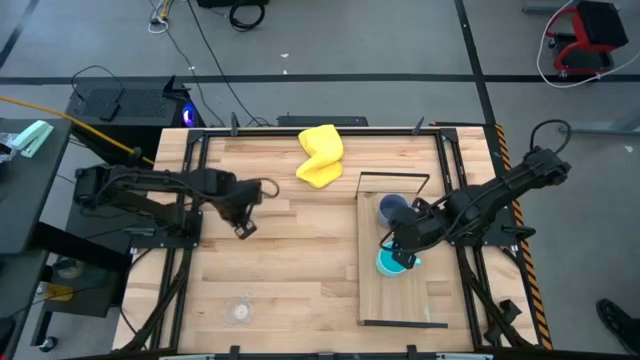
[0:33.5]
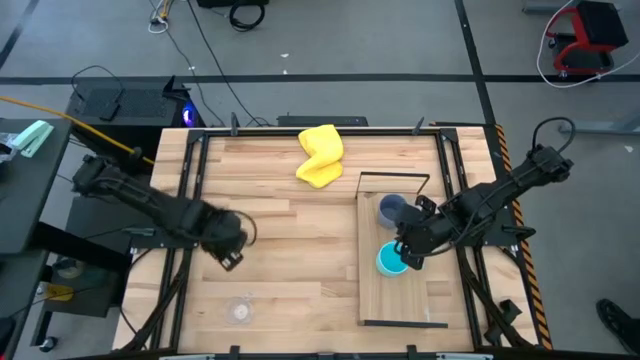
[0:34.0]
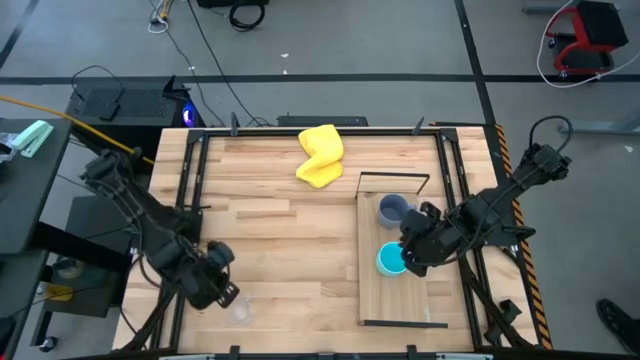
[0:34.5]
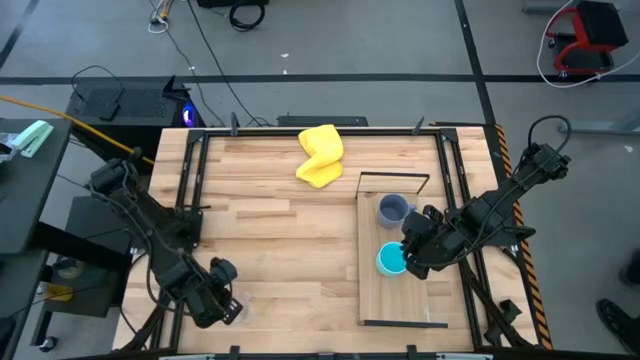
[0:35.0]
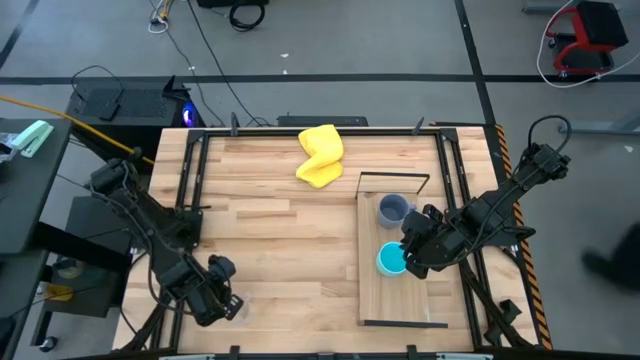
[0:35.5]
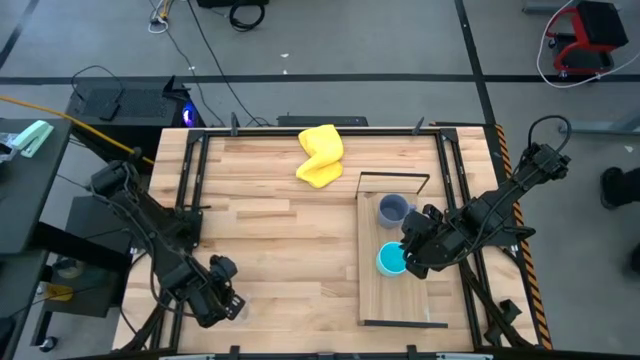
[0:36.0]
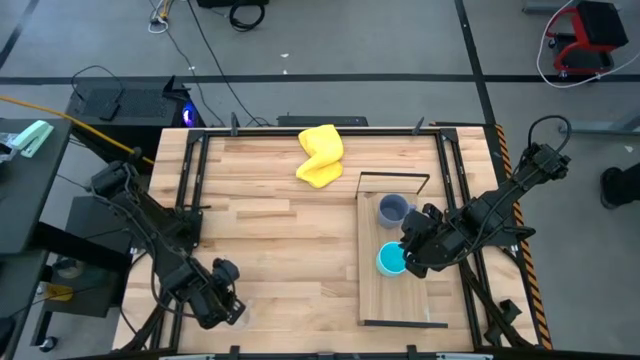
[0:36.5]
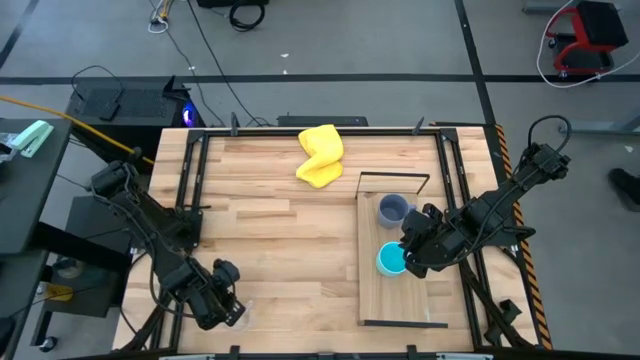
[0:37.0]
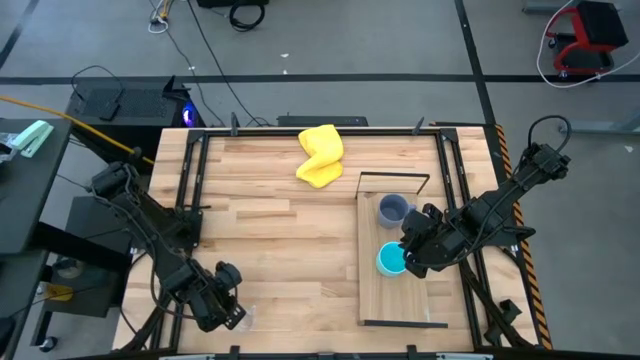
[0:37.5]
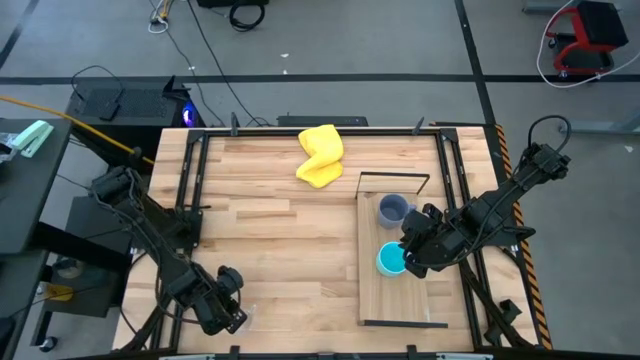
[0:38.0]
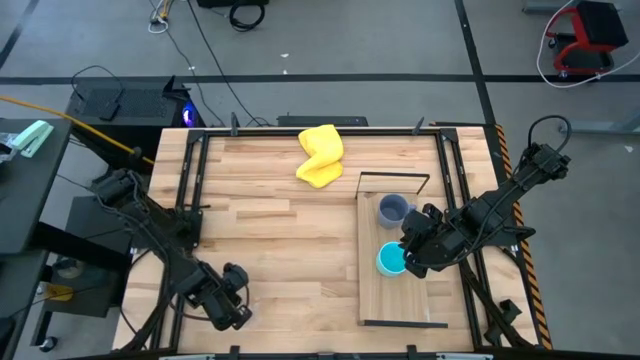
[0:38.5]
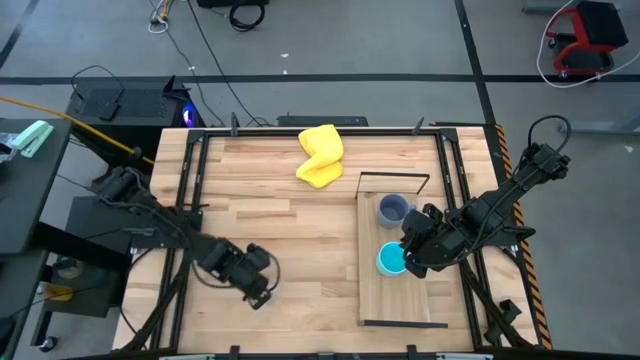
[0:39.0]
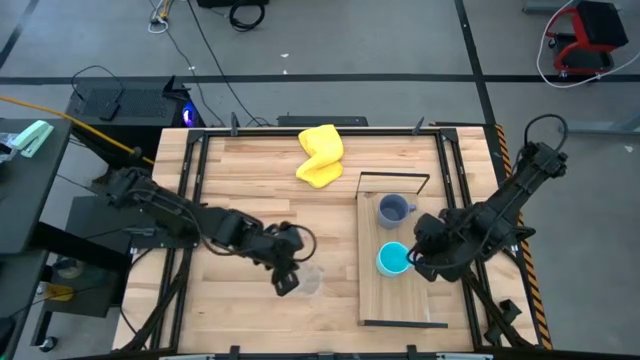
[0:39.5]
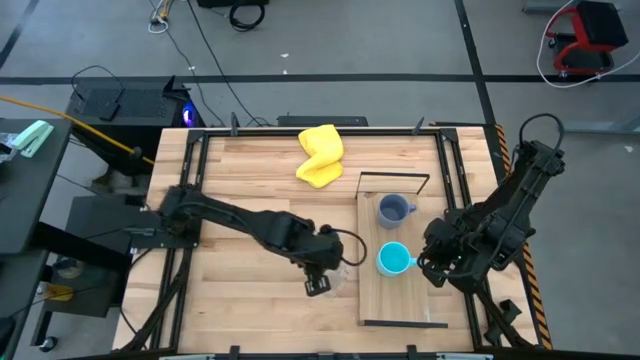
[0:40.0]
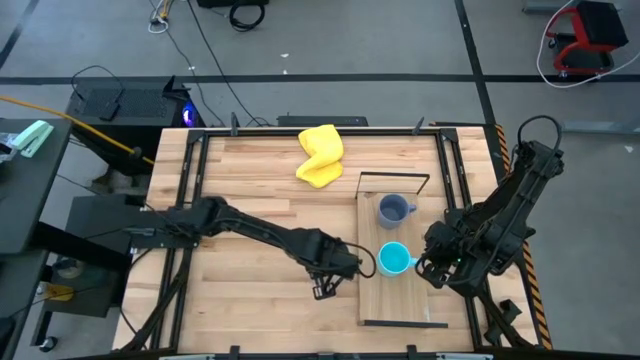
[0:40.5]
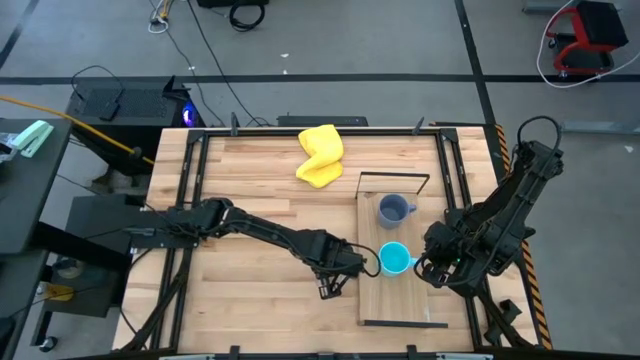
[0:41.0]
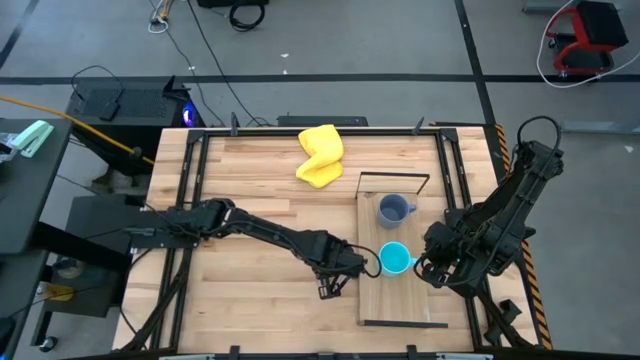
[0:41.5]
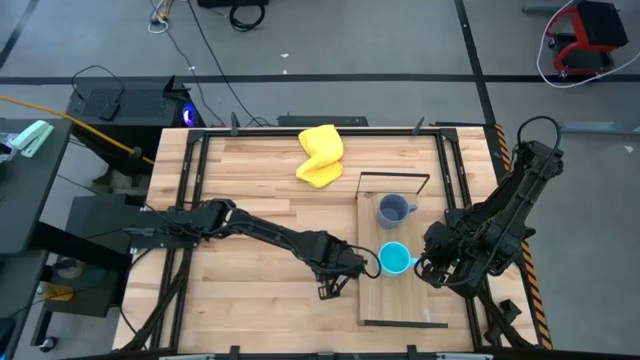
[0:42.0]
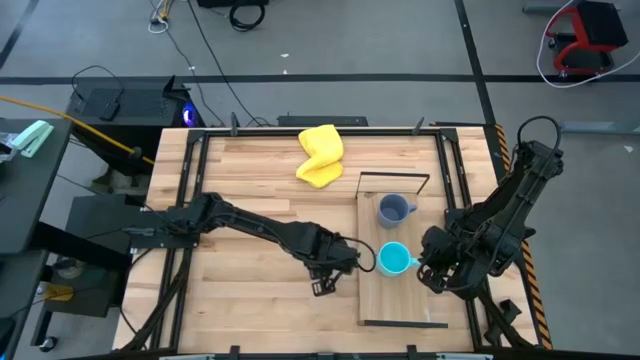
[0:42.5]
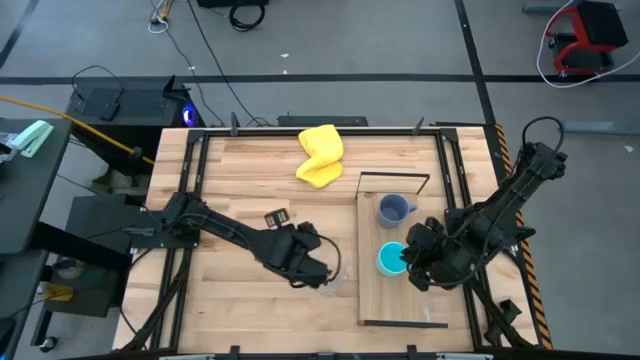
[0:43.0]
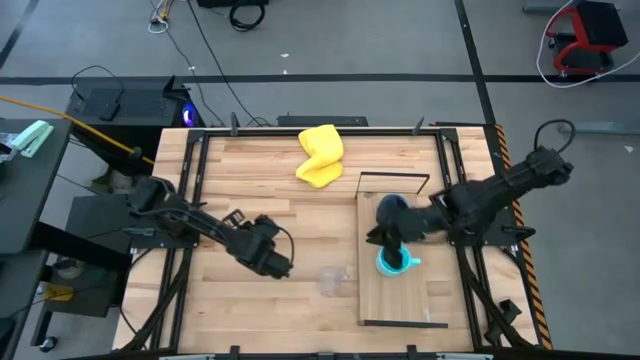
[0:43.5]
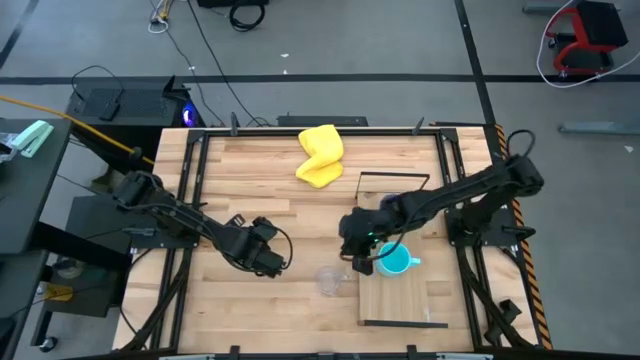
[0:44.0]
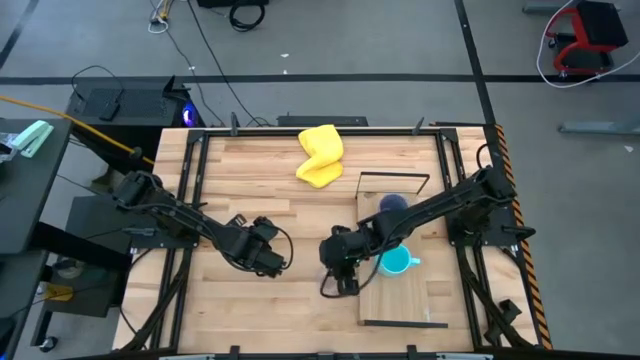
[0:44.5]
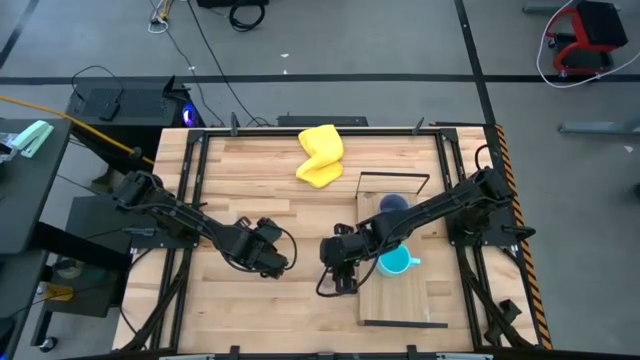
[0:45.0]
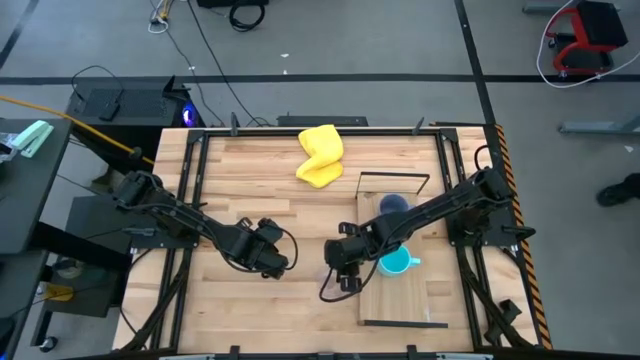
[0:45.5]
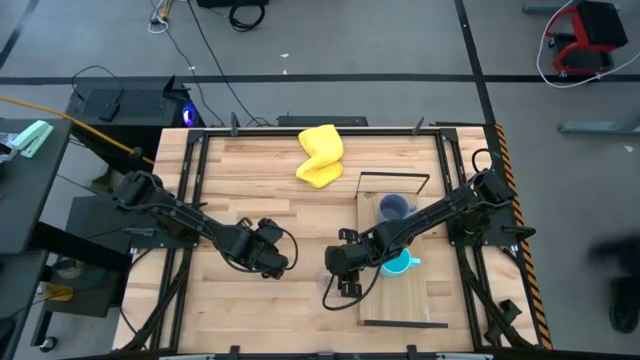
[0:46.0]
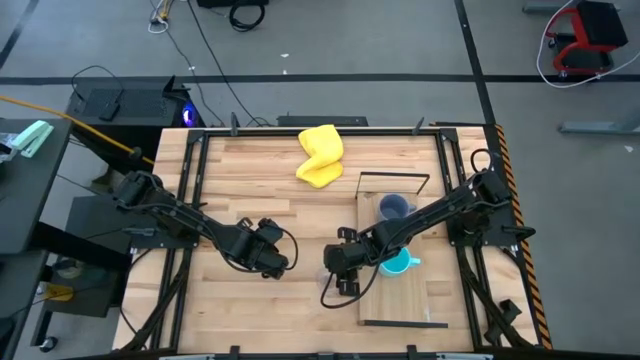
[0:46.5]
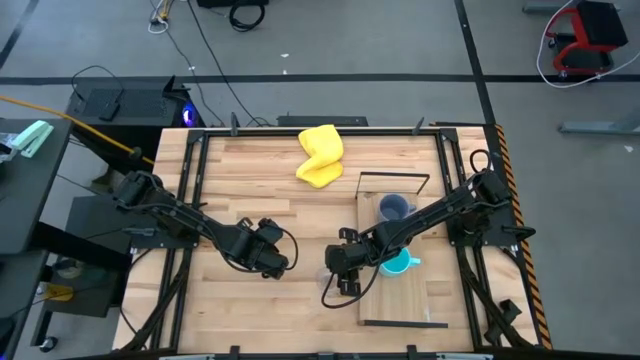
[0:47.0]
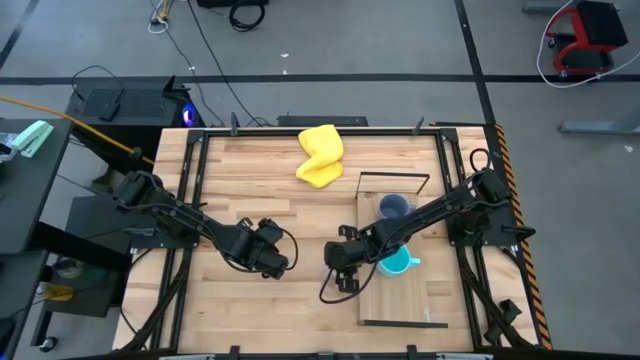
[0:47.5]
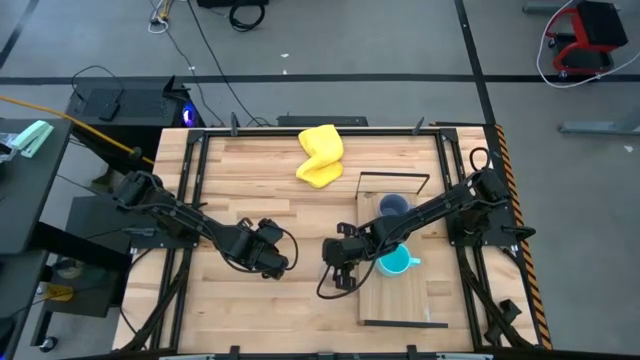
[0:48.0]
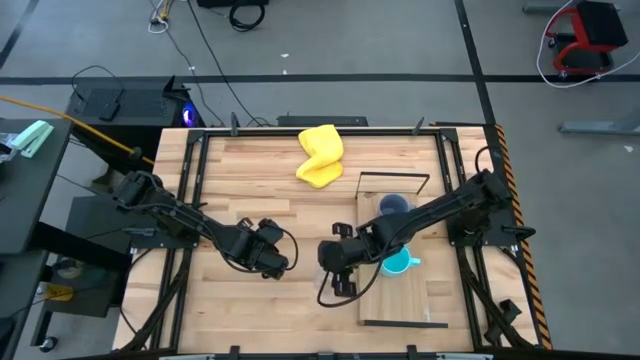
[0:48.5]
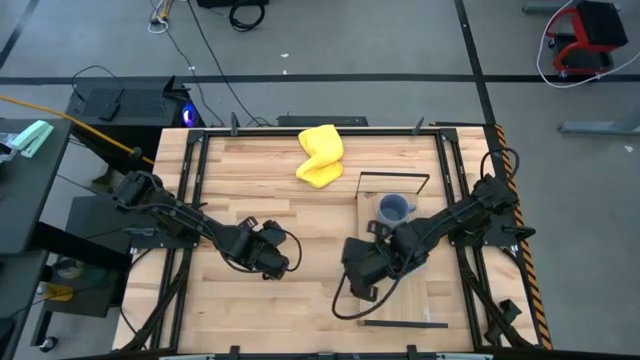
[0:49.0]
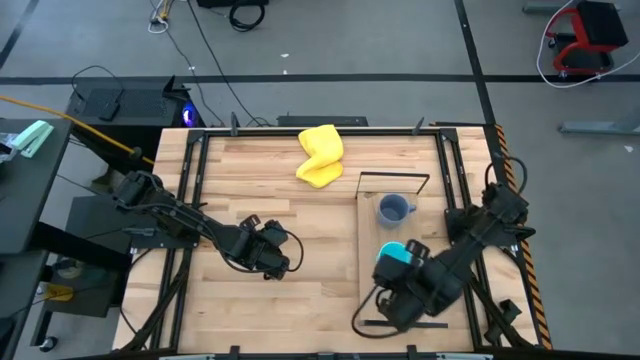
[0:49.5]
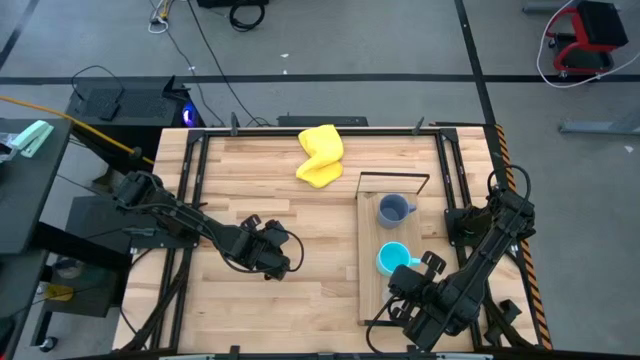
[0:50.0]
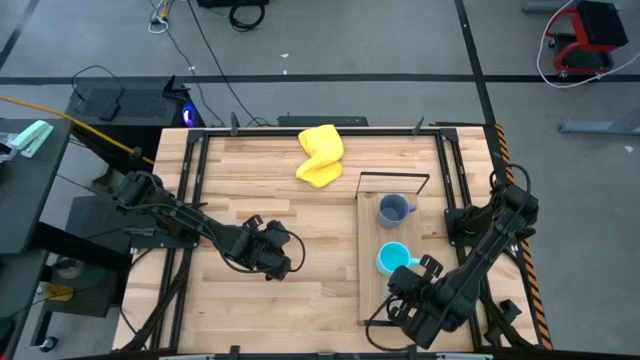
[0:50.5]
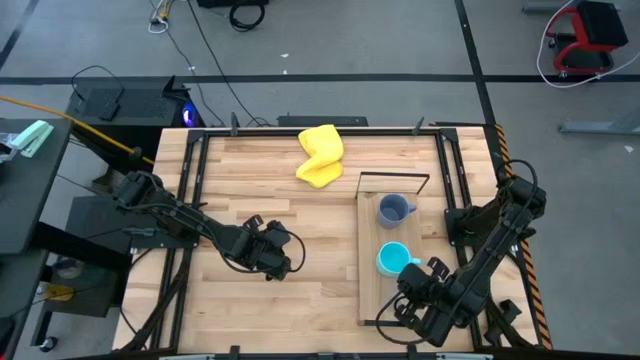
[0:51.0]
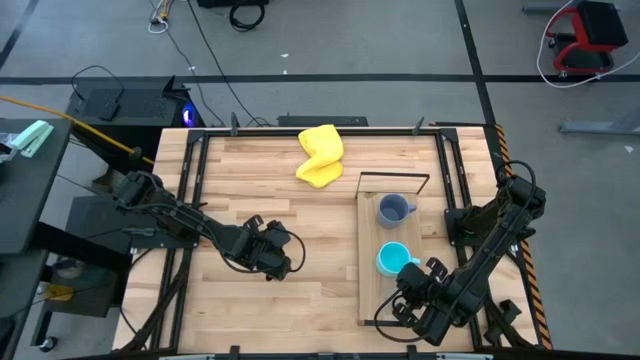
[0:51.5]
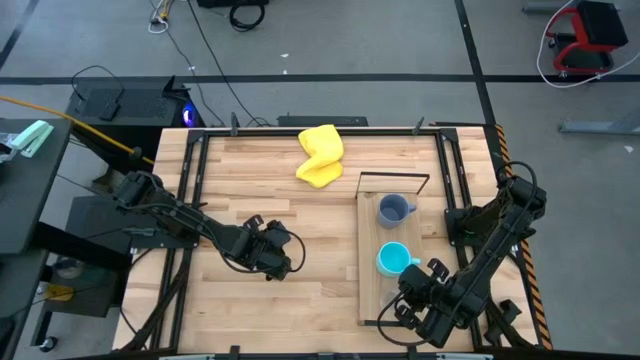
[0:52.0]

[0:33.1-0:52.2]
Task: Stack small to large cups/mugs on shelf
Put the transparent mug on the shelf

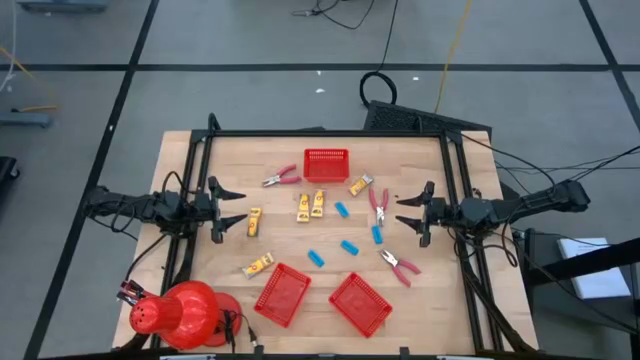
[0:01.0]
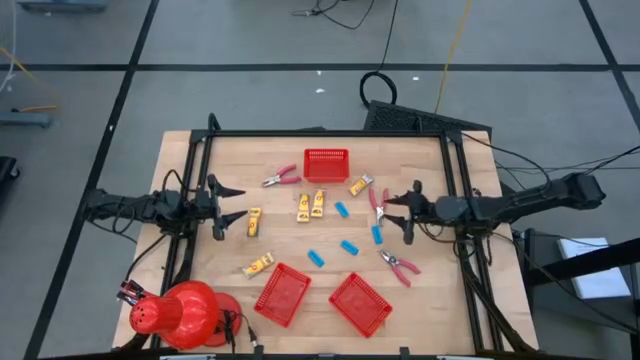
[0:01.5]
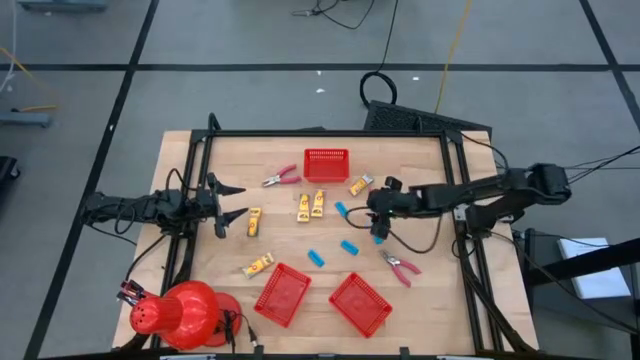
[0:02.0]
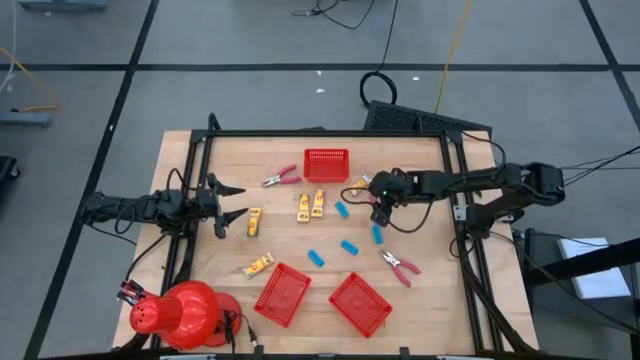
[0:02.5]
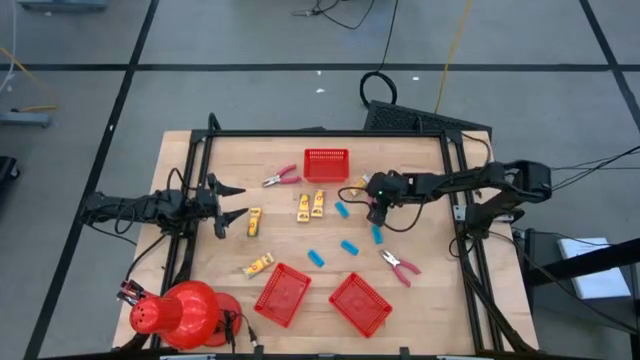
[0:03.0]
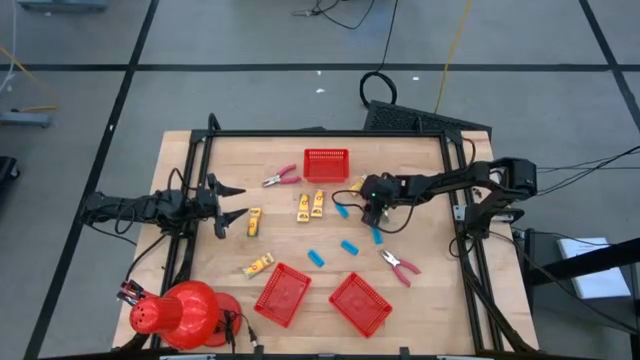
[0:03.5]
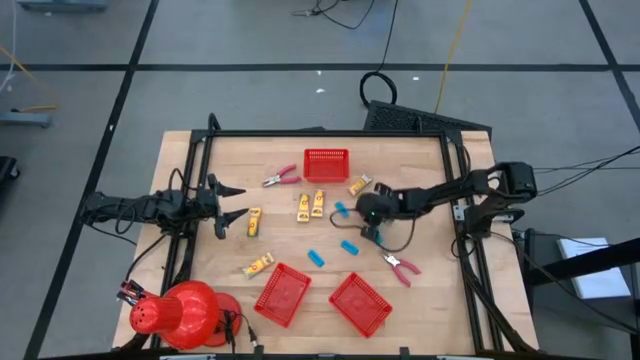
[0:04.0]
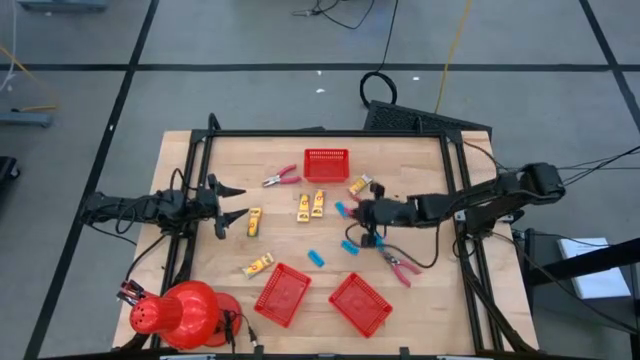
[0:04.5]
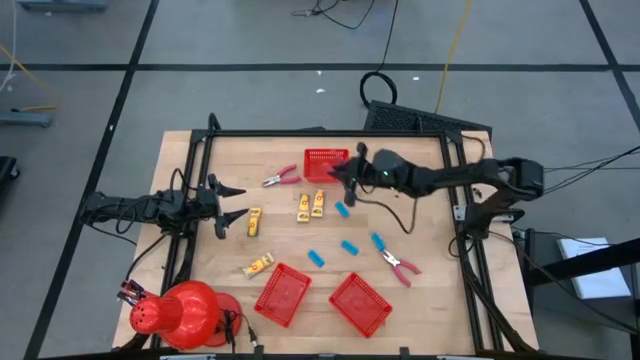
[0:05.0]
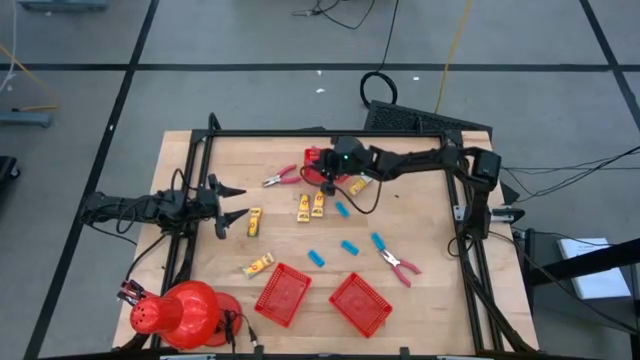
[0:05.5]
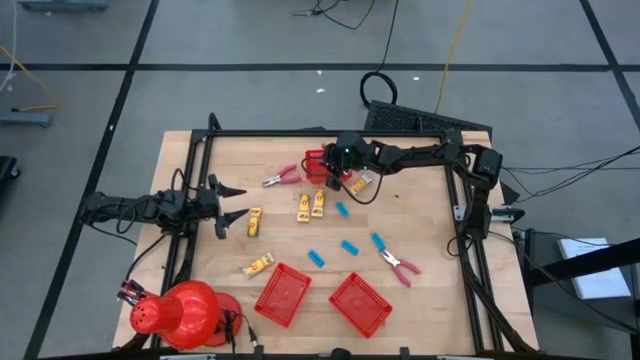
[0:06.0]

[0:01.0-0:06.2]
Task: Pick & Place School Supplies
Put the middle pink puncher into the top red basket
